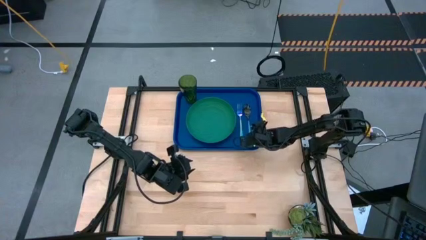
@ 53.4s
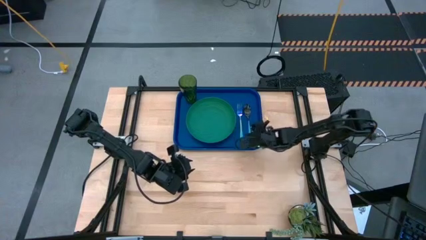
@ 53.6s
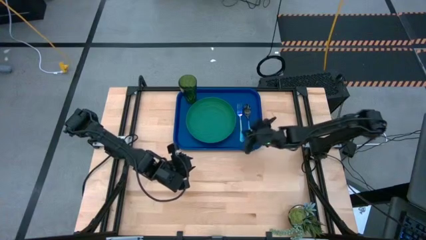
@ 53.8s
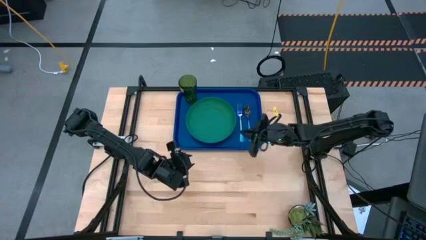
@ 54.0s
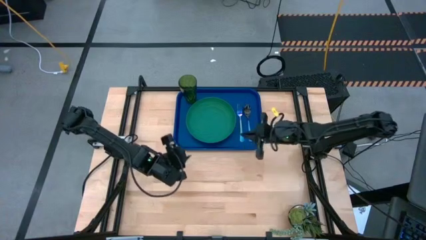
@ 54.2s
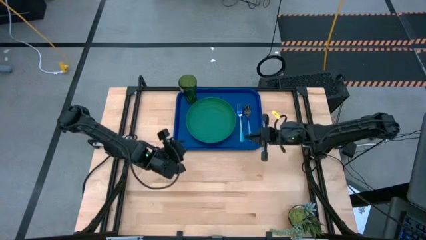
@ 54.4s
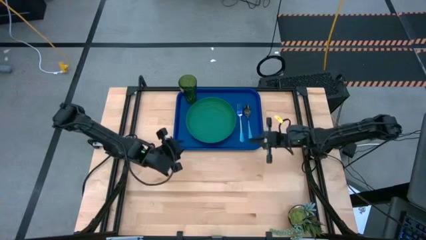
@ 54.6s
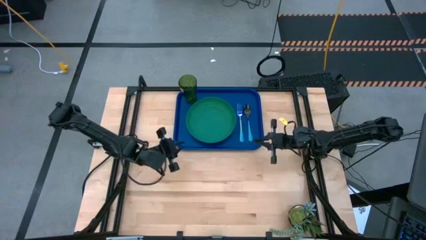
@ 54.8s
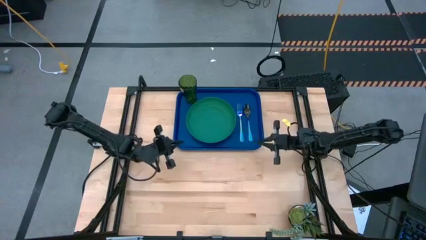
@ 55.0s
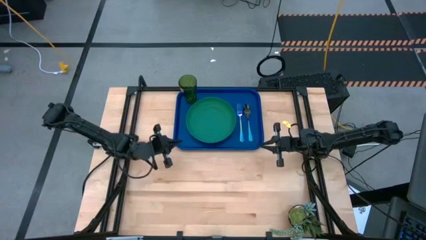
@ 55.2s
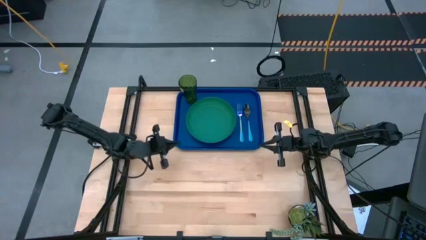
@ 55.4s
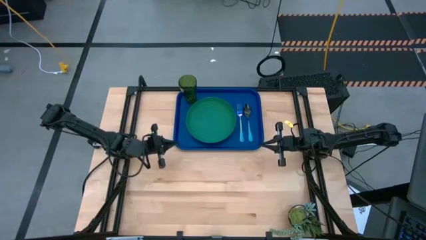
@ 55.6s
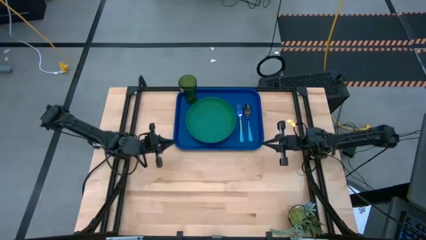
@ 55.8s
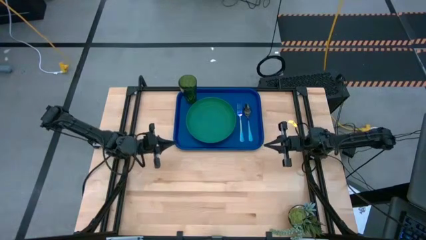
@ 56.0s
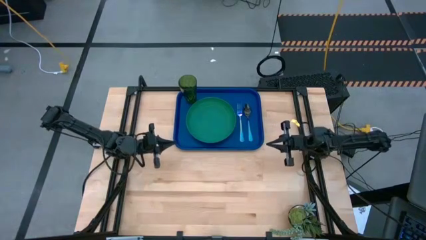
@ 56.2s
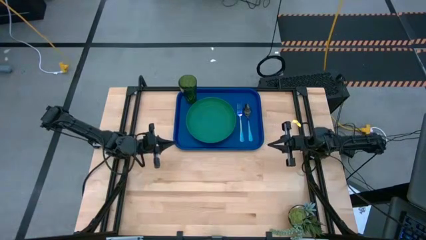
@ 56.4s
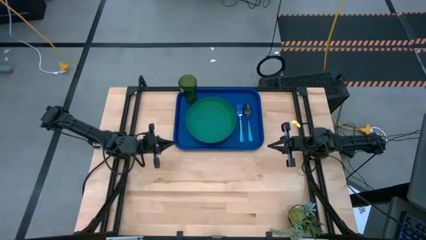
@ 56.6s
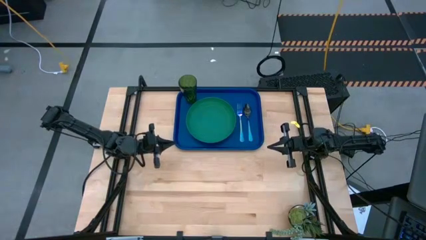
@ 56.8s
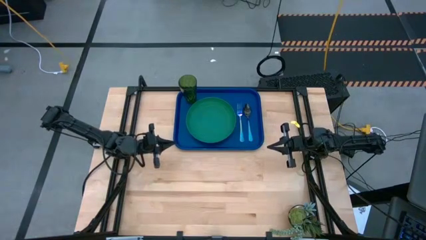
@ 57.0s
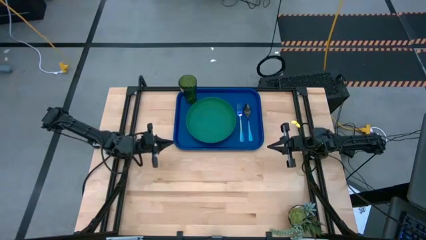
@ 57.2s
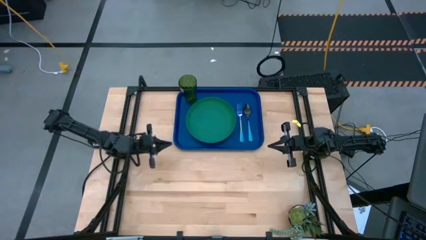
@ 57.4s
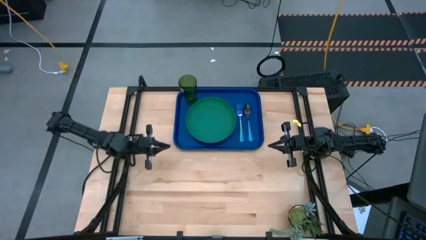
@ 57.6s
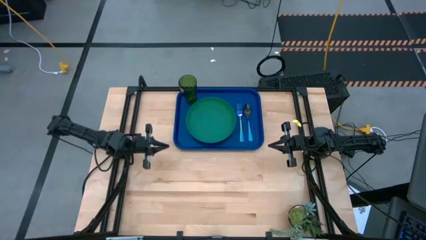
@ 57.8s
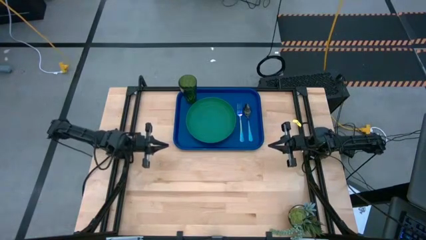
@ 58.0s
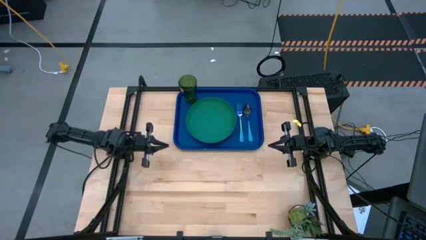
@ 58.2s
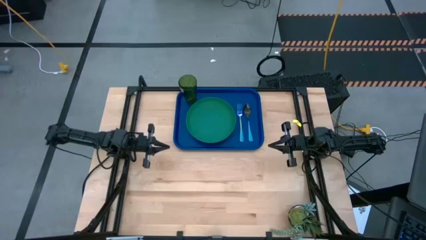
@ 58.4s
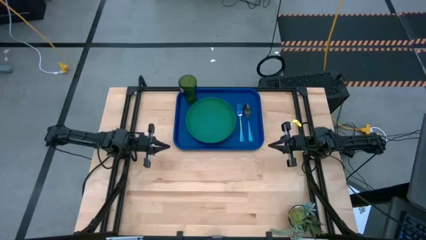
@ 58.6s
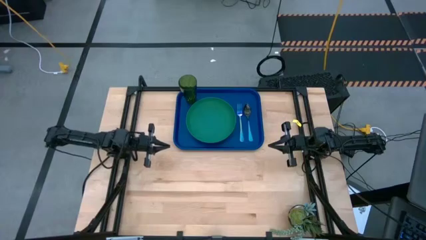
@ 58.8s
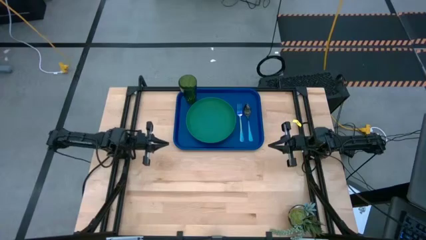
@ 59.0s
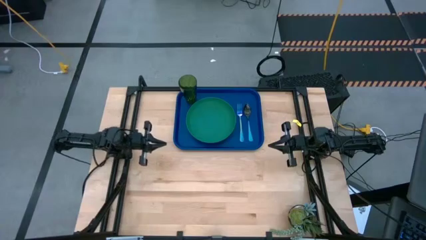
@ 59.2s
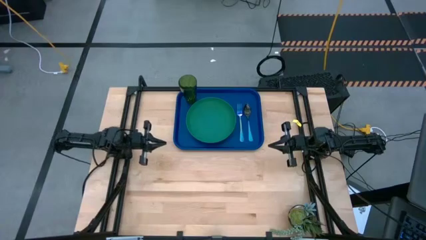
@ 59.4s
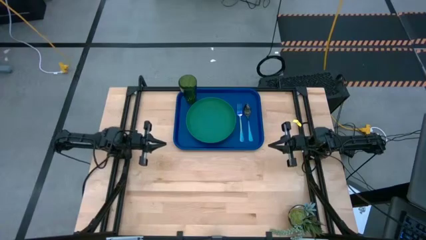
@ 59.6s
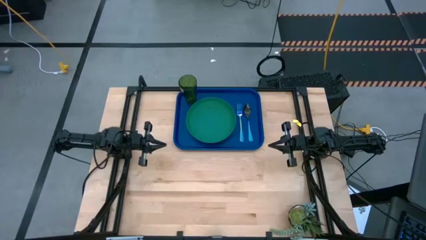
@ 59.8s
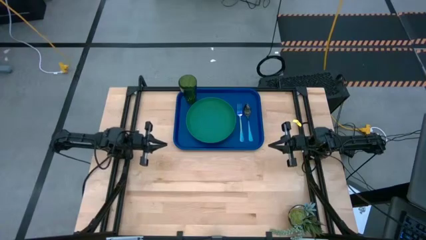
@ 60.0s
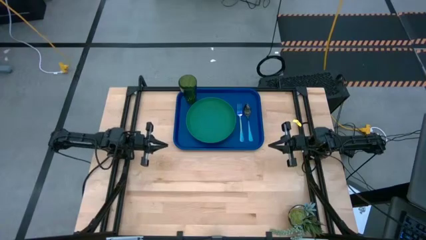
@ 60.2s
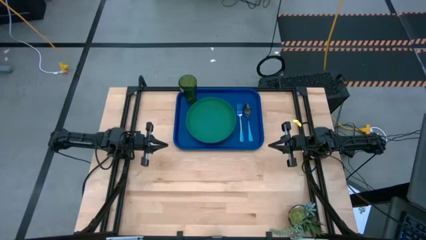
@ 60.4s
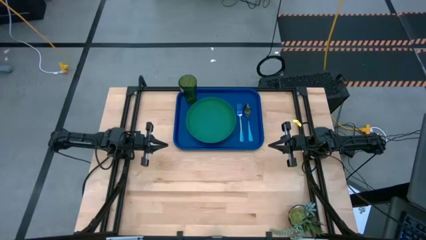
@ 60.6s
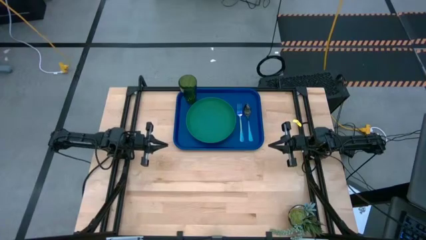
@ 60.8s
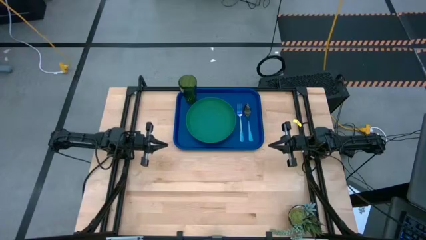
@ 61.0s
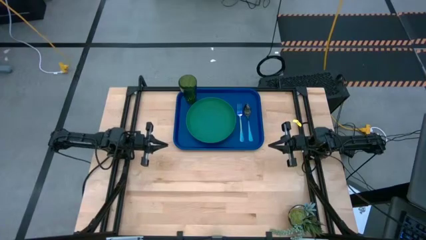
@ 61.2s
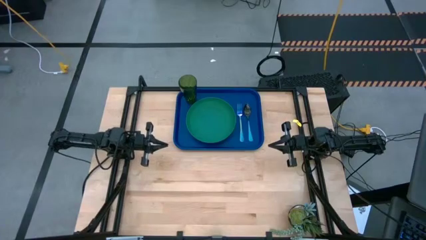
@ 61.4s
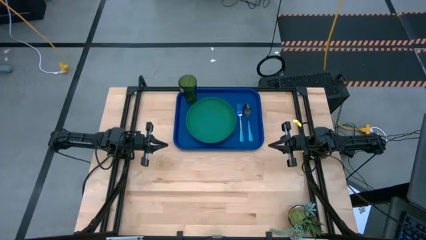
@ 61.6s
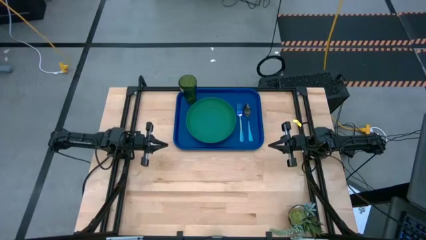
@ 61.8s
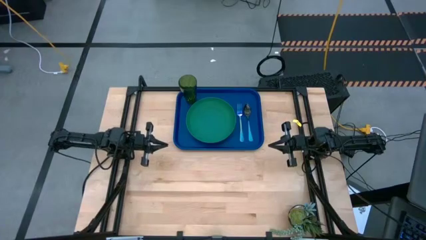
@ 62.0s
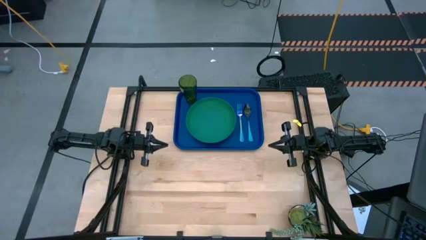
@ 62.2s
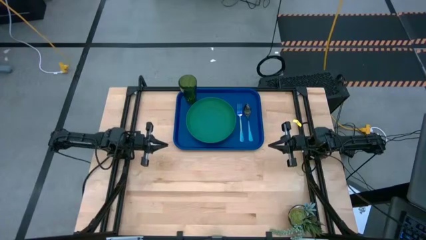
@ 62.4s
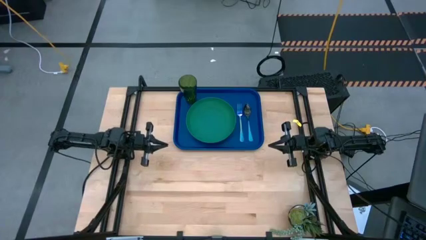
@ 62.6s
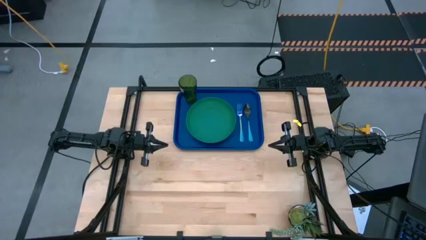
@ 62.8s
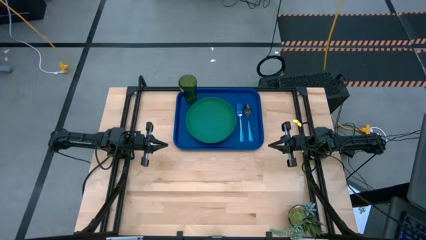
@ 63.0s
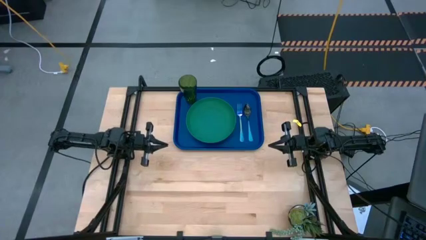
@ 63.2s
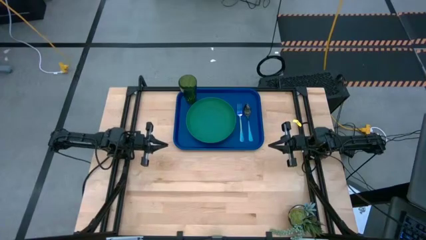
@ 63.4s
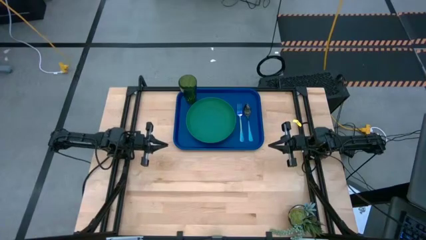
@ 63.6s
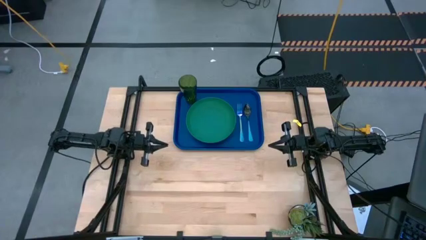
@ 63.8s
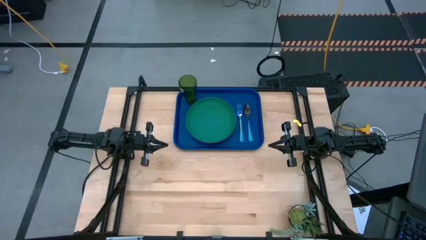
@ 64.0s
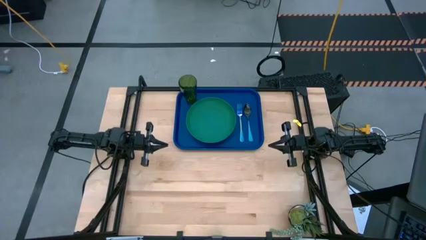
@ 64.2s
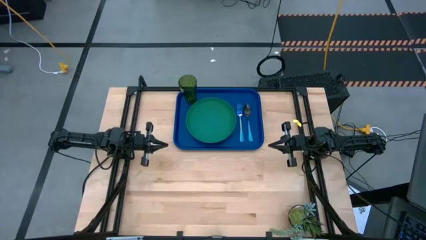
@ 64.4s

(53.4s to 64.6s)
Task: Pick and place plate/cup/fork/spoon on tray
Return to Home Position
